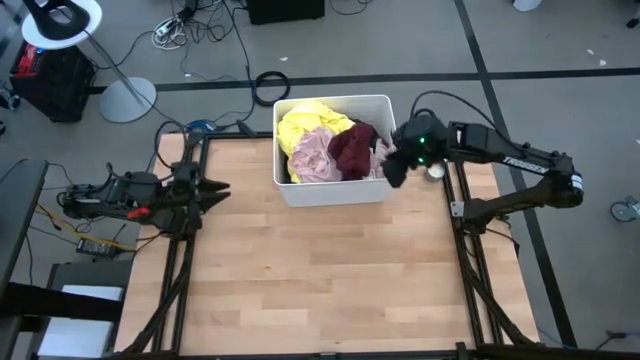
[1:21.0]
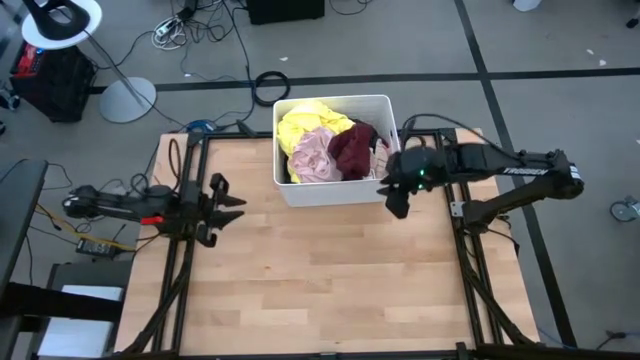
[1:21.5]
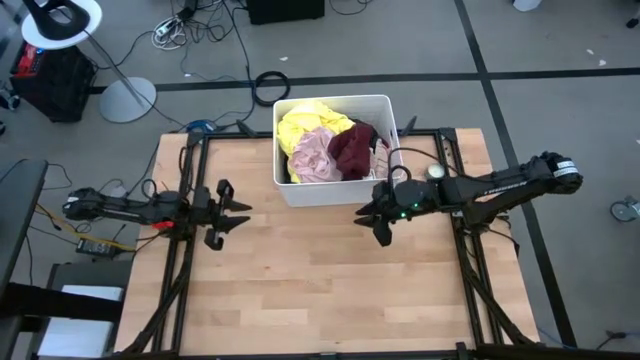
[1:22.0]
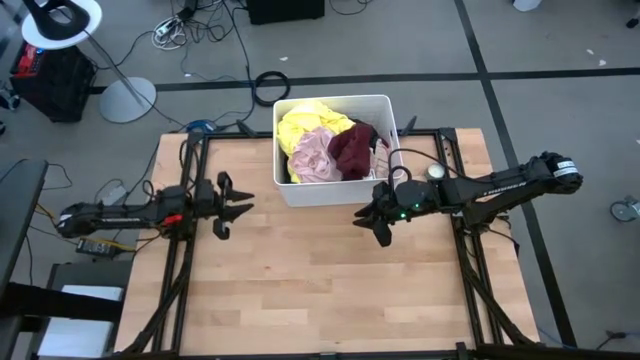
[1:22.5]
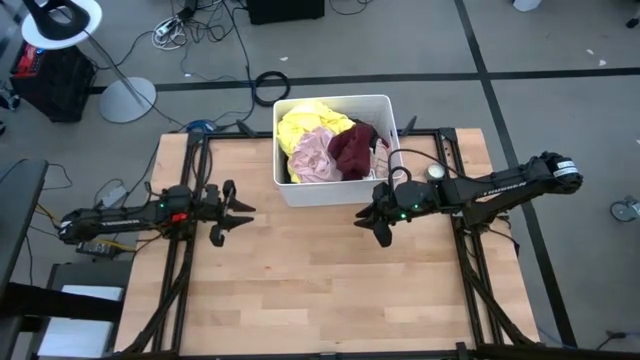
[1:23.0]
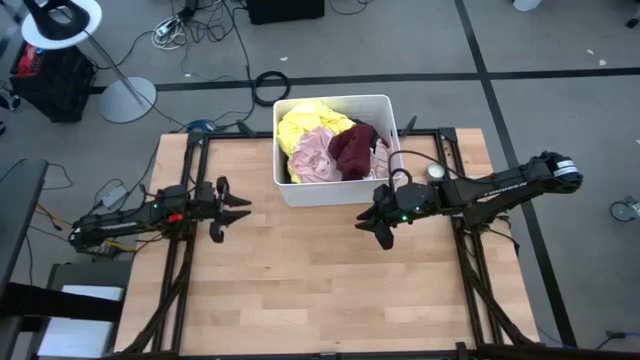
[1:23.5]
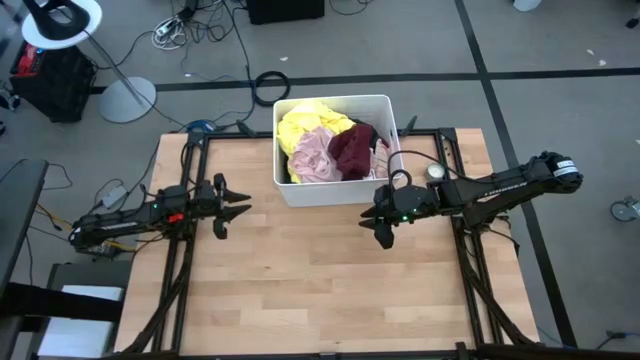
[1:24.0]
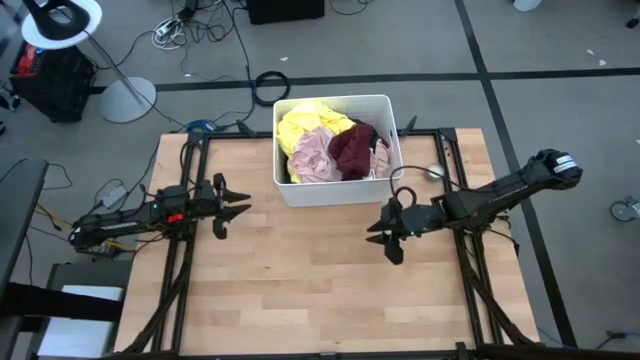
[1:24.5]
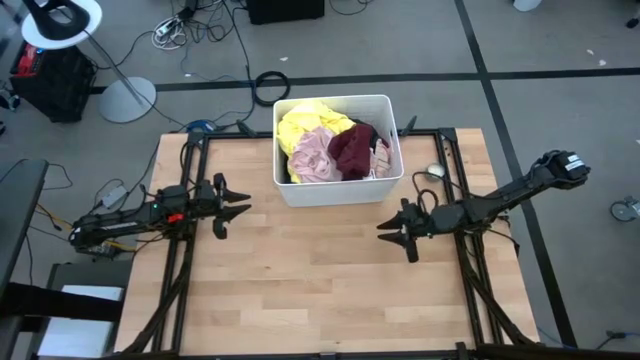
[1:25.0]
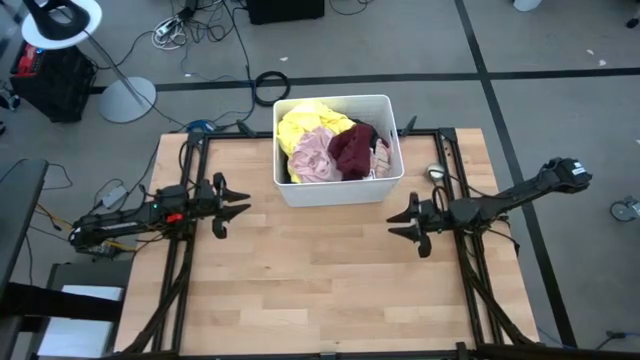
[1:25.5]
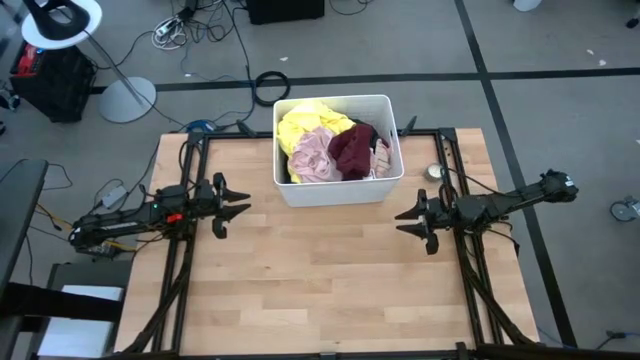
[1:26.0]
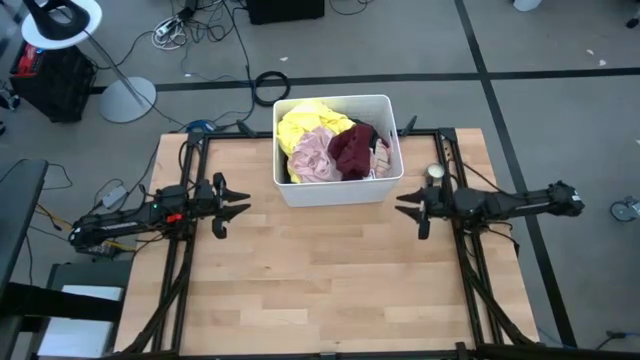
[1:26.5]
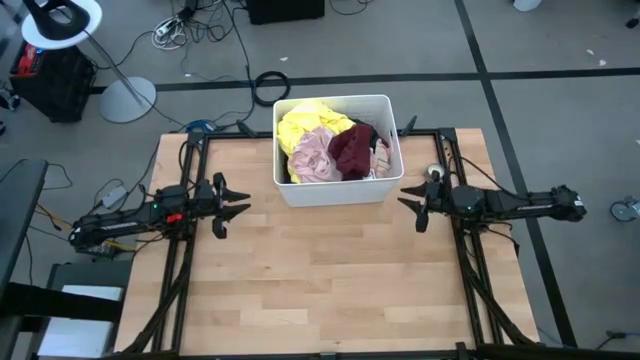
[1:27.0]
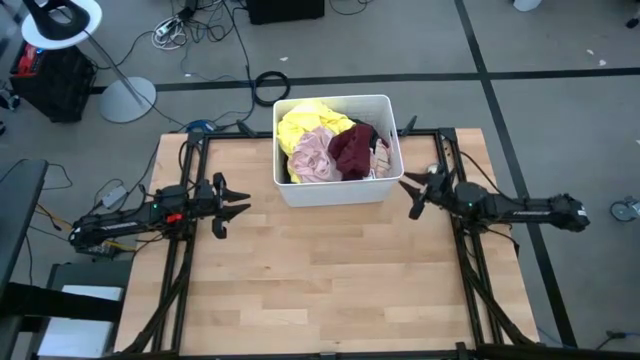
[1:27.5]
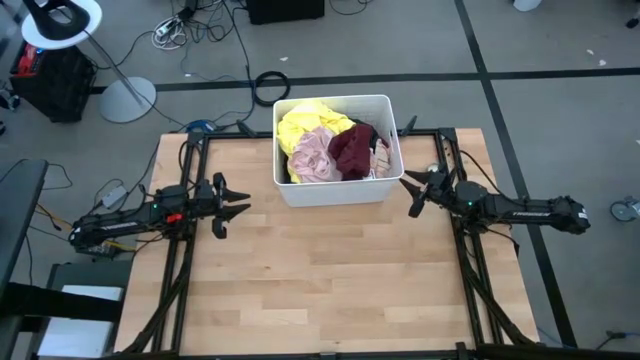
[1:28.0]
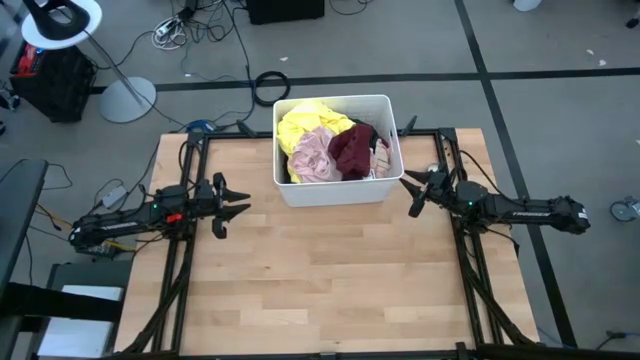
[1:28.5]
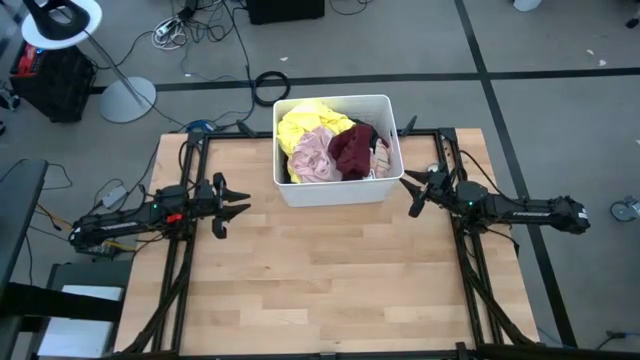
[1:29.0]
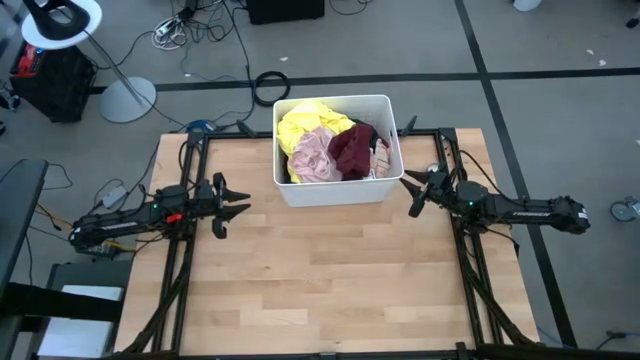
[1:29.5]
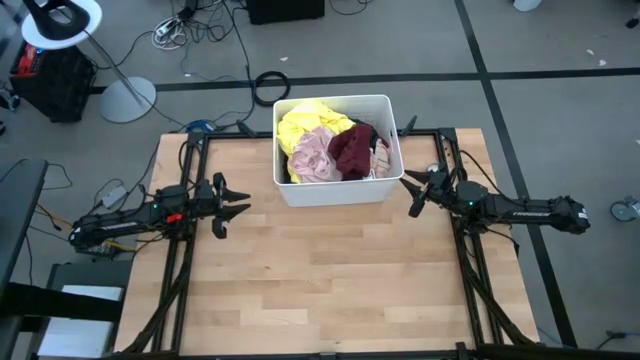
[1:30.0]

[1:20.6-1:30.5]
Task: Sort clothes
Return to Home Position

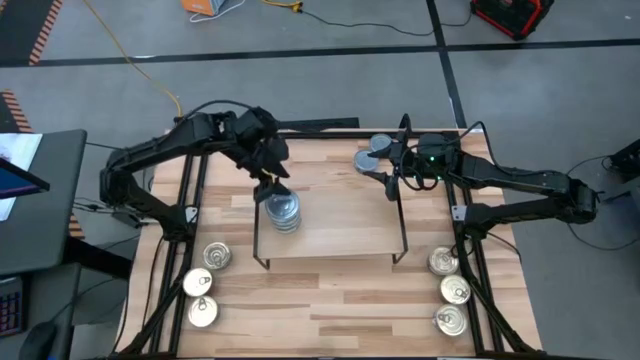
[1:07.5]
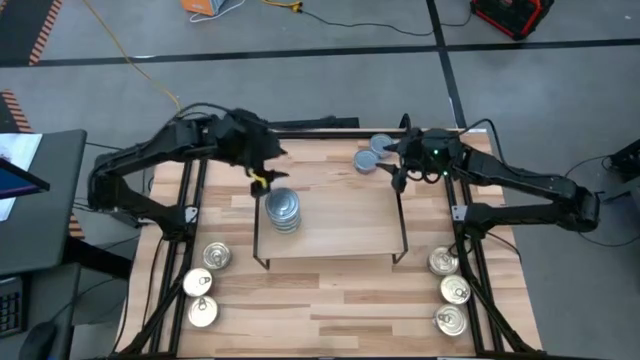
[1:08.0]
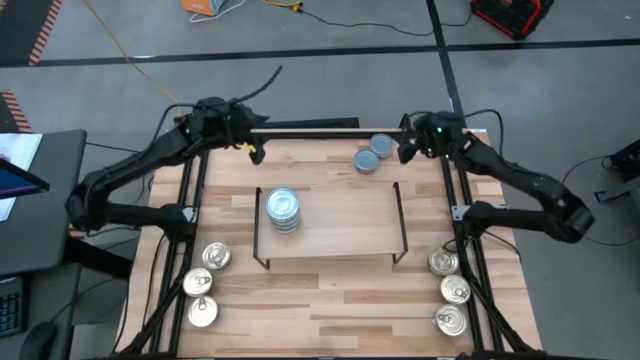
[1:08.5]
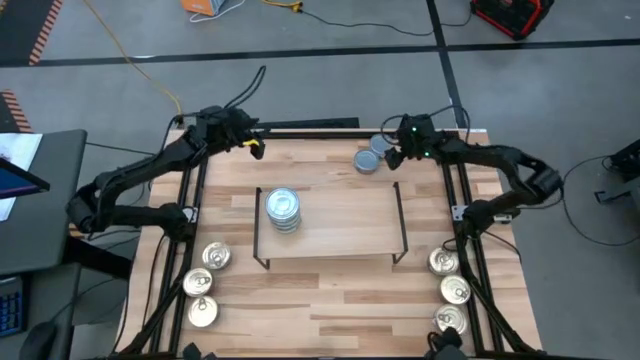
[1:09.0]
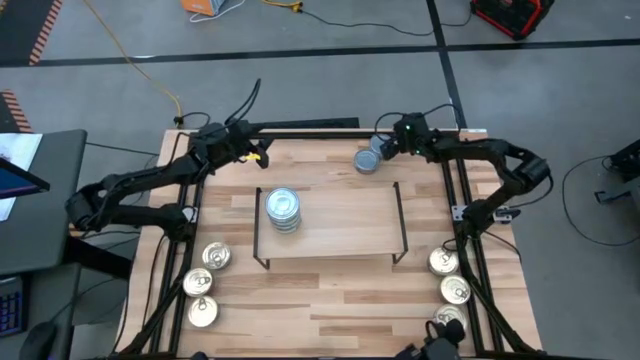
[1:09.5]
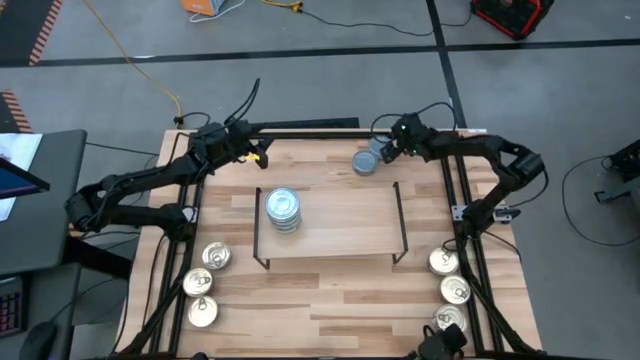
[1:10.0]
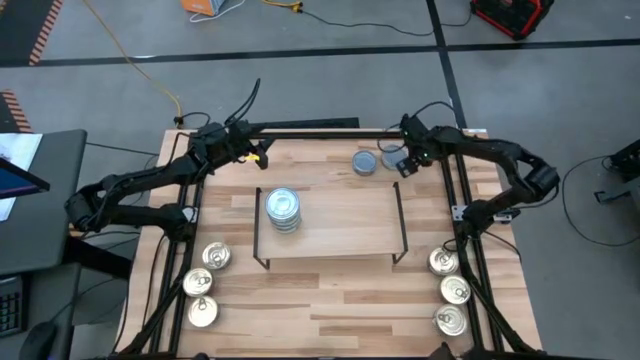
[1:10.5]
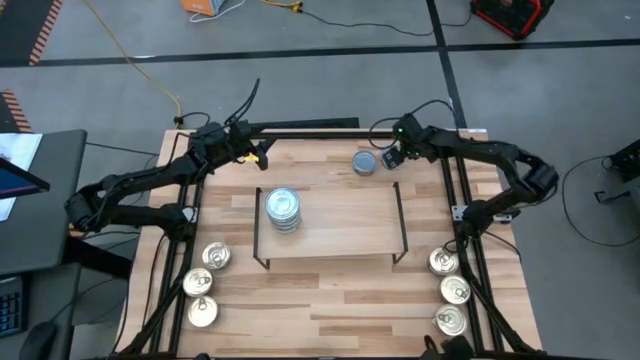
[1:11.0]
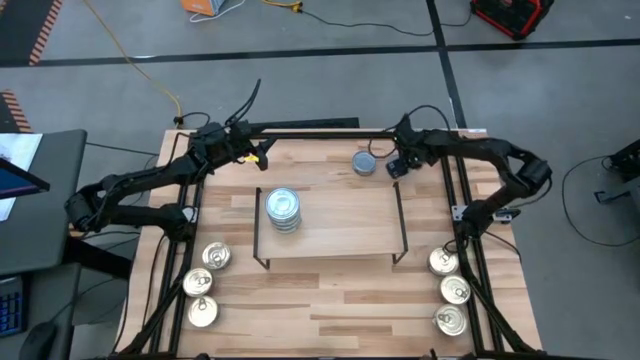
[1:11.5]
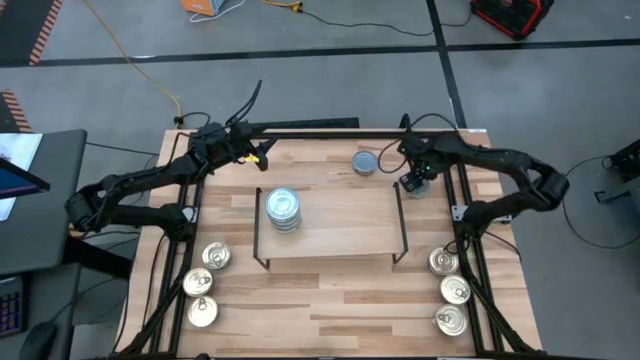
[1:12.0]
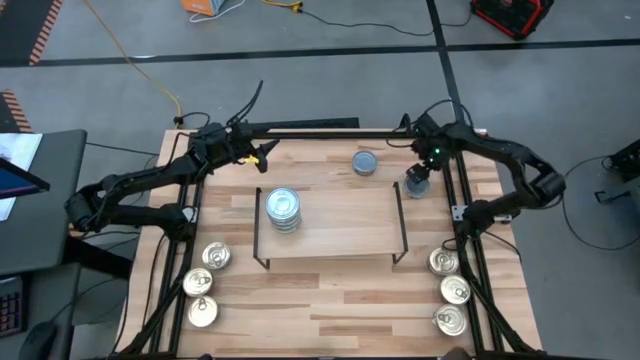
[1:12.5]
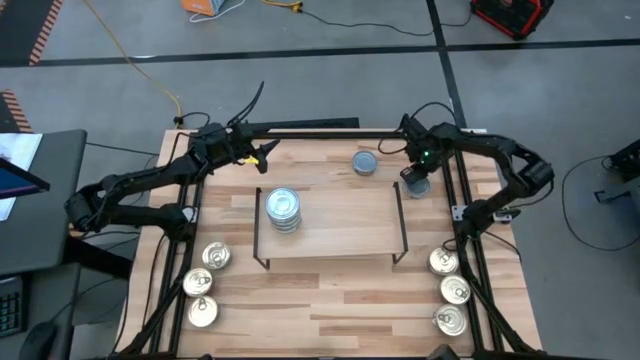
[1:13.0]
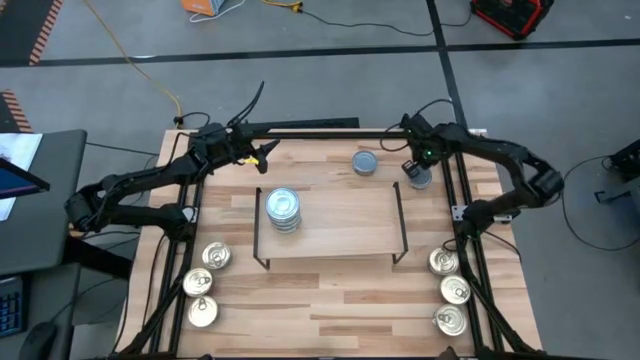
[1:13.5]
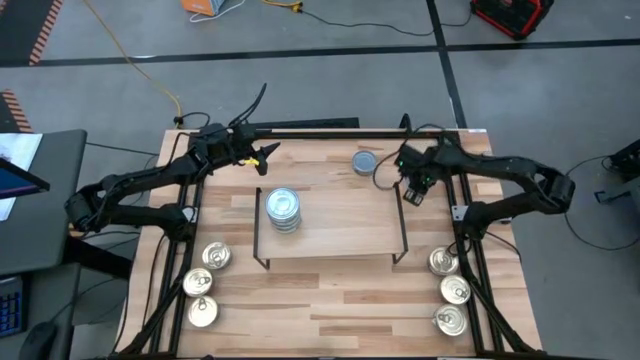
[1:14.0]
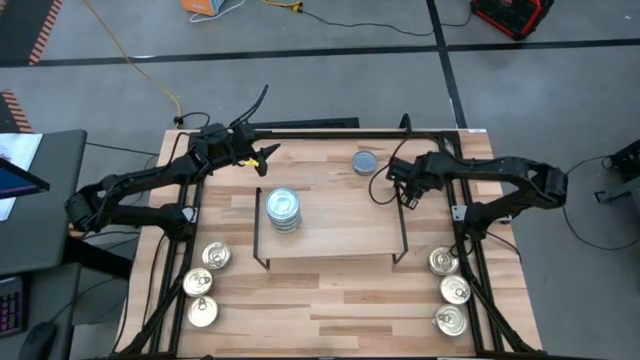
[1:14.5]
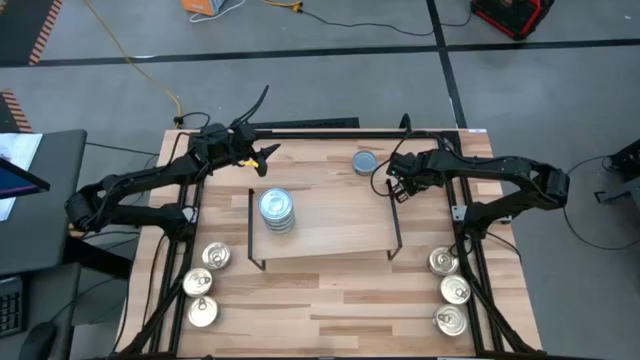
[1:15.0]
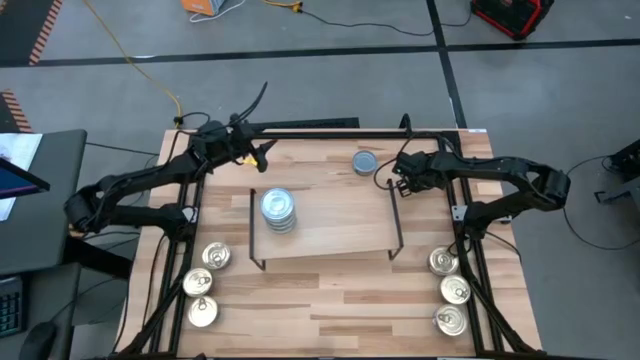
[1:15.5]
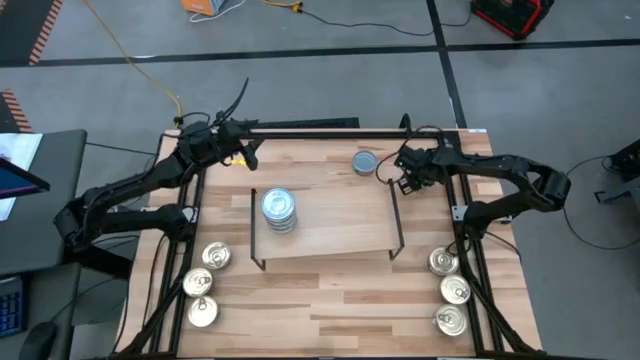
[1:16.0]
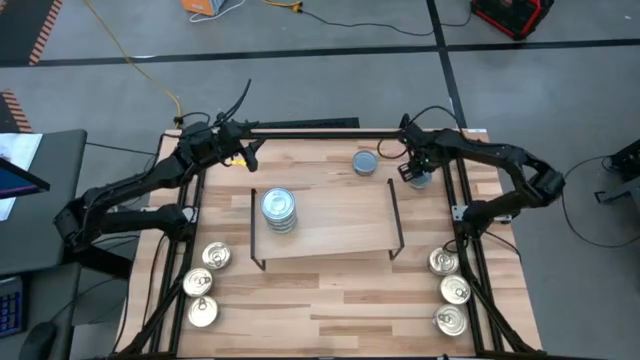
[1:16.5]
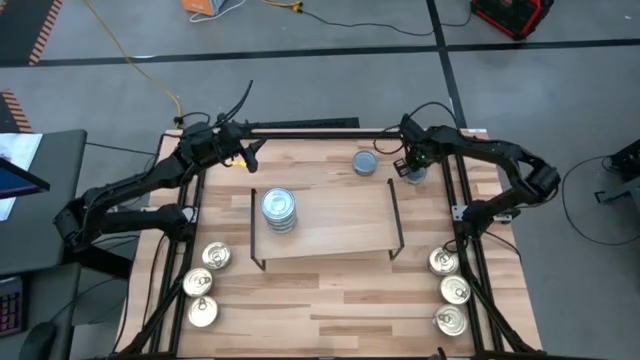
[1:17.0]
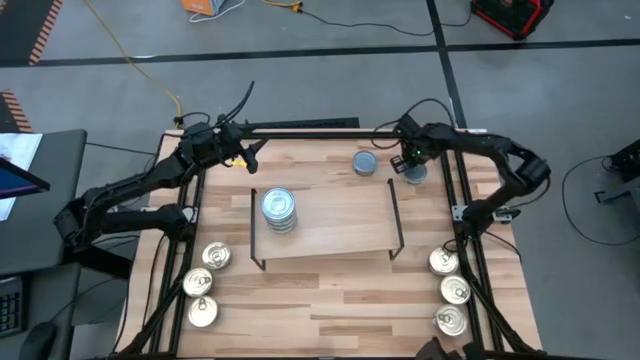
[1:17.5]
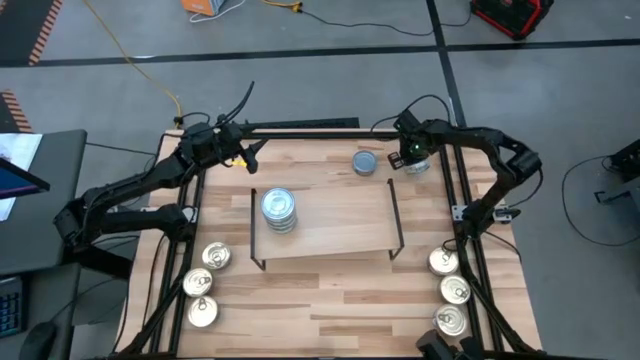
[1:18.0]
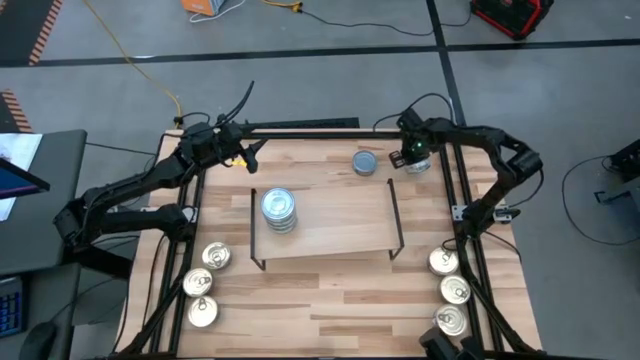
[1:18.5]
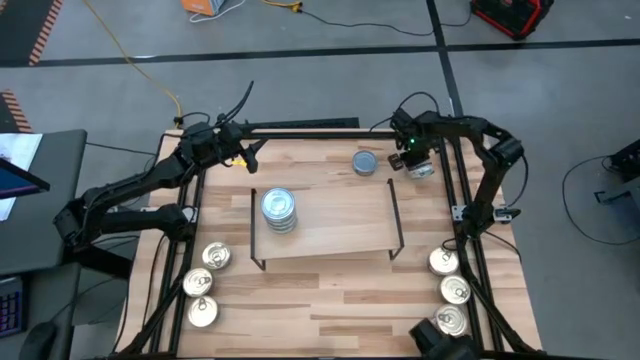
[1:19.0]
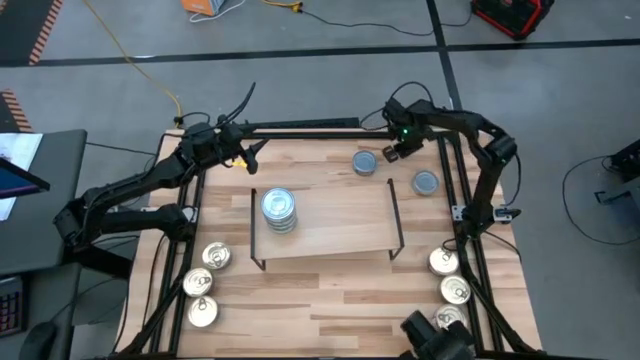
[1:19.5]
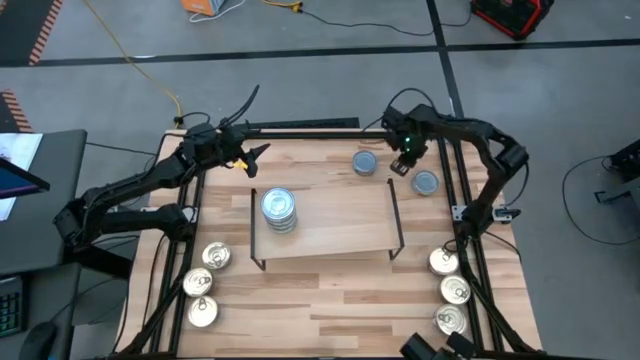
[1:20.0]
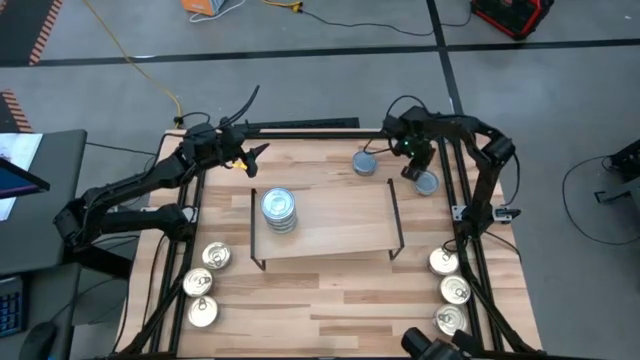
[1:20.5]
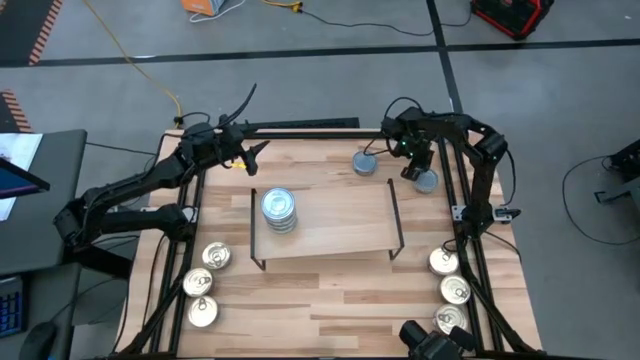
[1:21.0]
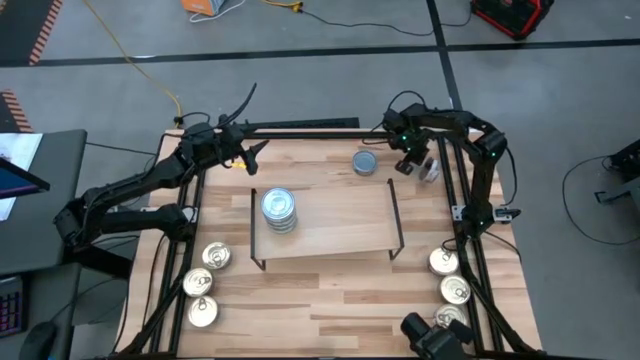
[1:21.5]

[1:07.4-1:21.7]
Task: Stack canned seafood by type on shelf
Stack the green tuna can on top of the green tuna can on the shelf
